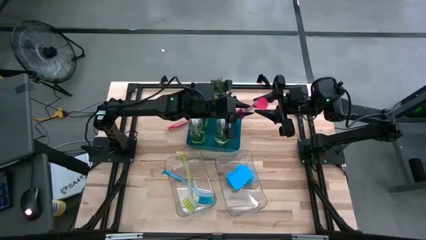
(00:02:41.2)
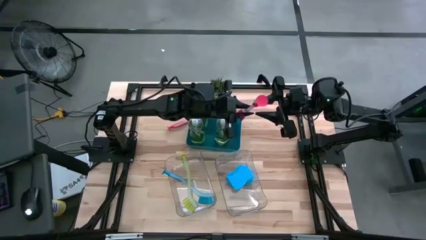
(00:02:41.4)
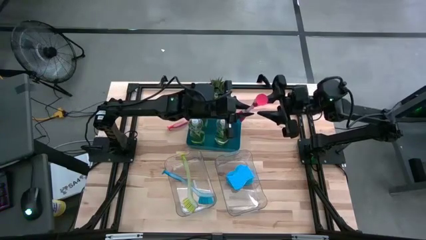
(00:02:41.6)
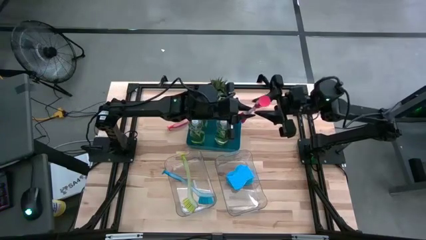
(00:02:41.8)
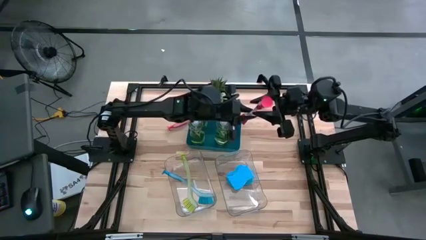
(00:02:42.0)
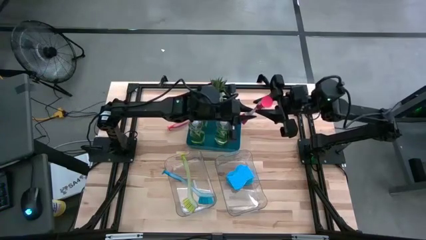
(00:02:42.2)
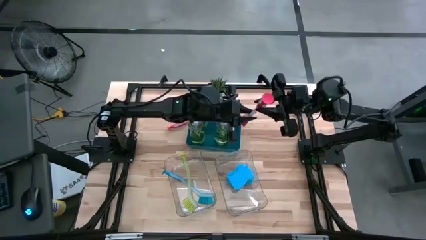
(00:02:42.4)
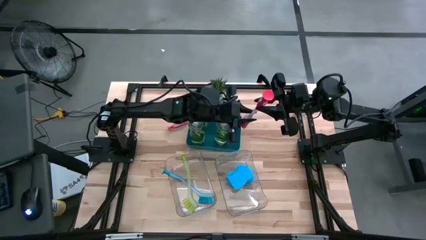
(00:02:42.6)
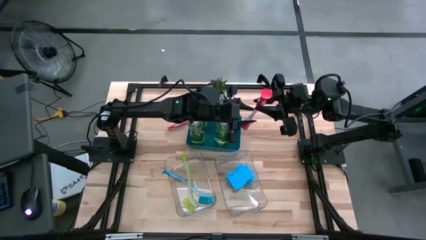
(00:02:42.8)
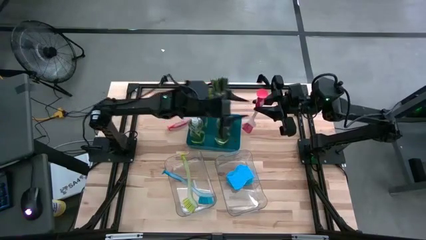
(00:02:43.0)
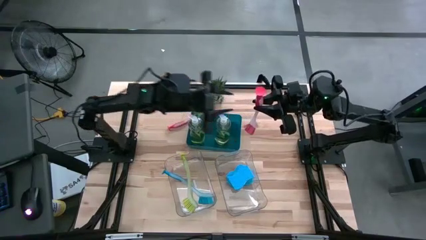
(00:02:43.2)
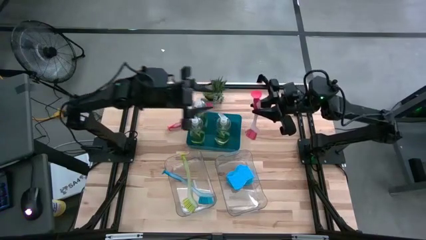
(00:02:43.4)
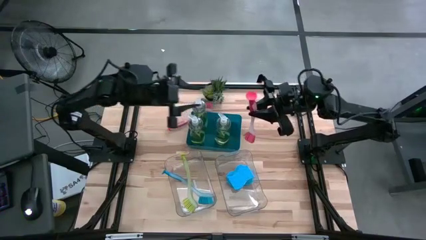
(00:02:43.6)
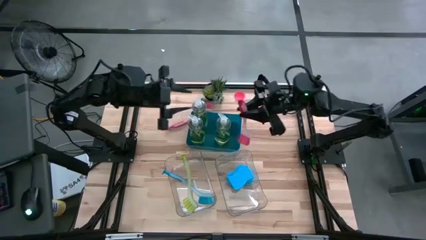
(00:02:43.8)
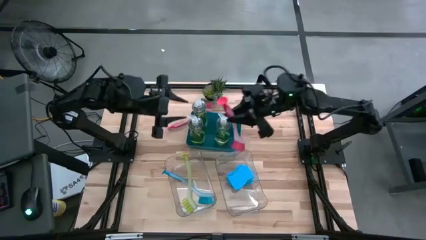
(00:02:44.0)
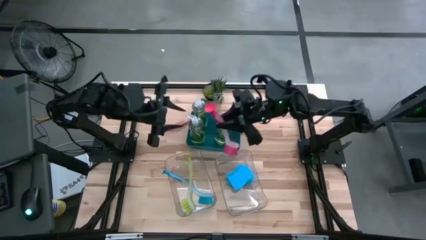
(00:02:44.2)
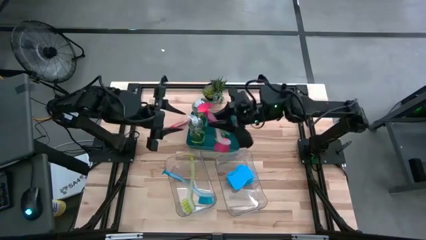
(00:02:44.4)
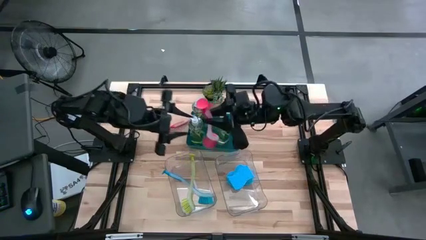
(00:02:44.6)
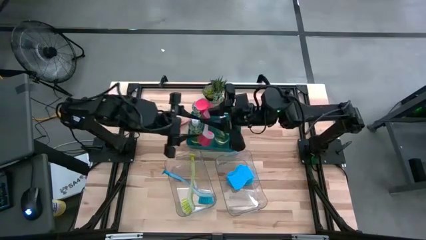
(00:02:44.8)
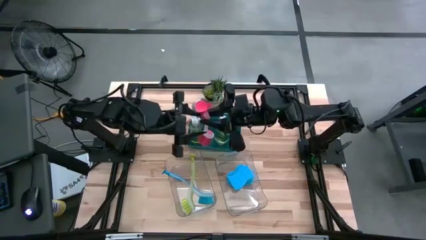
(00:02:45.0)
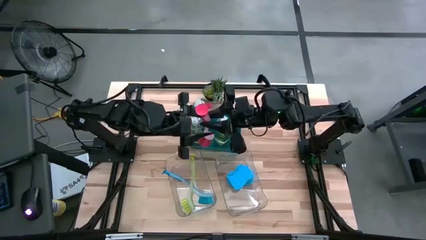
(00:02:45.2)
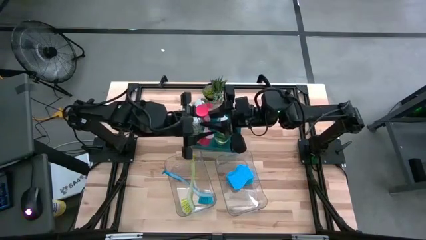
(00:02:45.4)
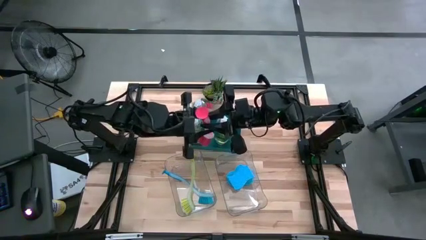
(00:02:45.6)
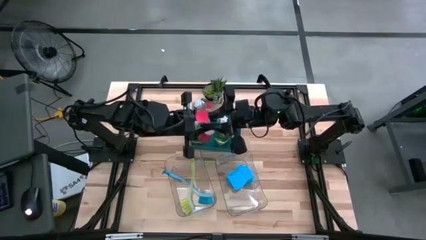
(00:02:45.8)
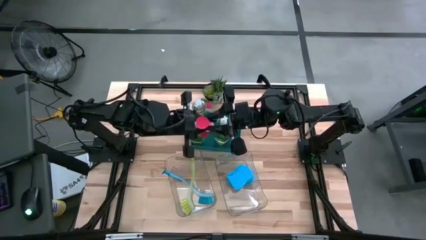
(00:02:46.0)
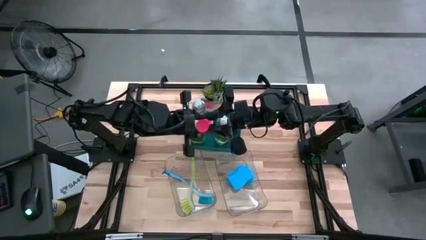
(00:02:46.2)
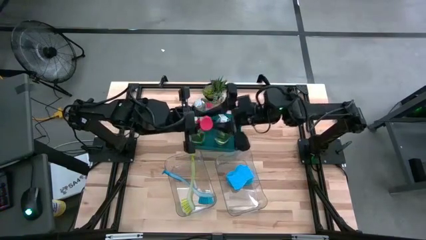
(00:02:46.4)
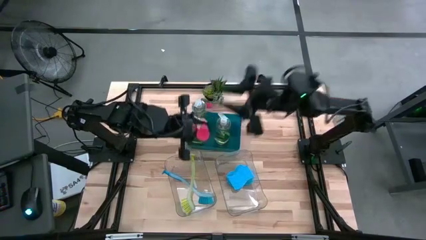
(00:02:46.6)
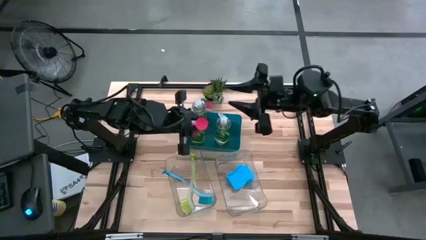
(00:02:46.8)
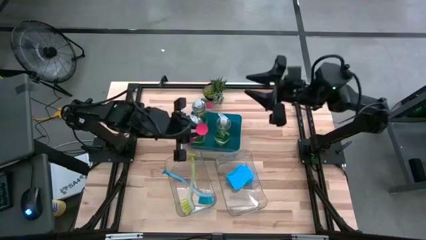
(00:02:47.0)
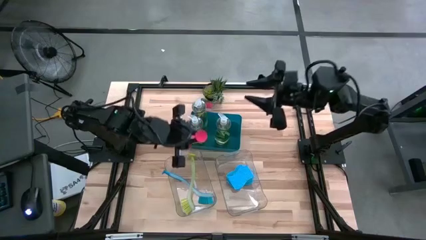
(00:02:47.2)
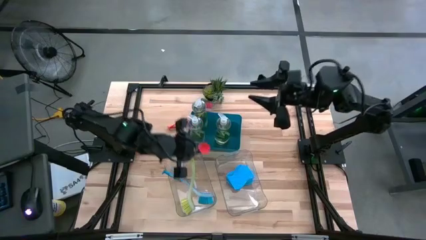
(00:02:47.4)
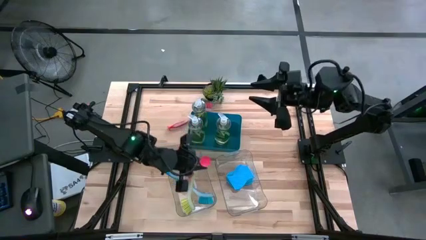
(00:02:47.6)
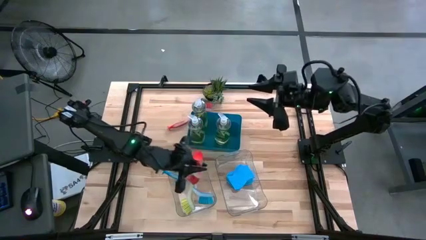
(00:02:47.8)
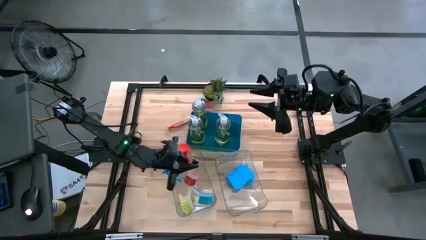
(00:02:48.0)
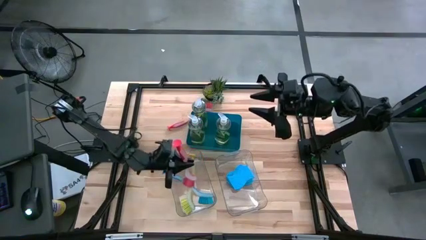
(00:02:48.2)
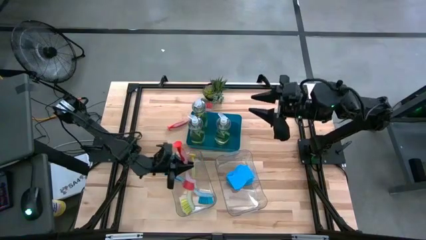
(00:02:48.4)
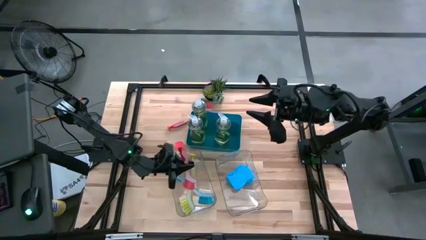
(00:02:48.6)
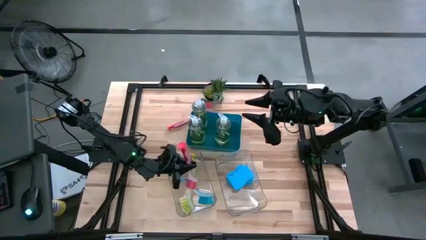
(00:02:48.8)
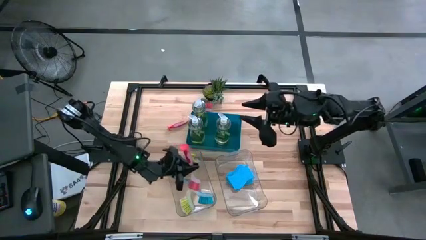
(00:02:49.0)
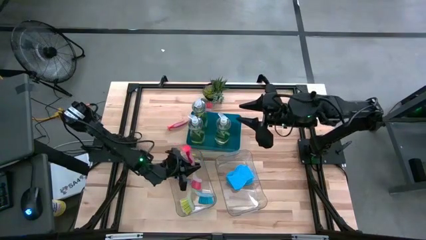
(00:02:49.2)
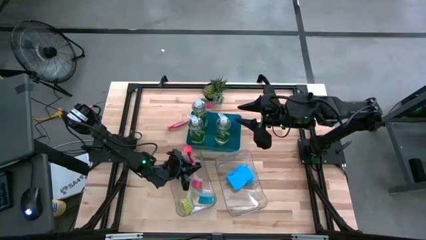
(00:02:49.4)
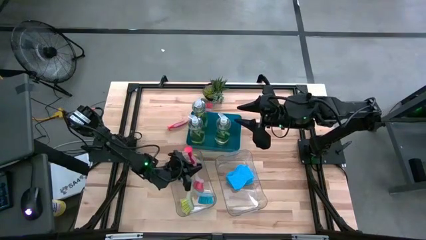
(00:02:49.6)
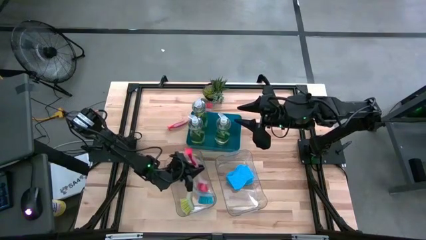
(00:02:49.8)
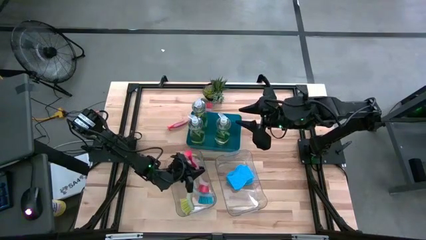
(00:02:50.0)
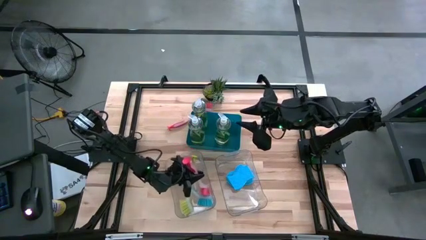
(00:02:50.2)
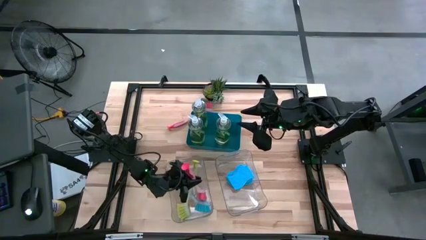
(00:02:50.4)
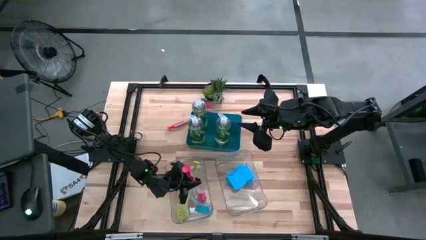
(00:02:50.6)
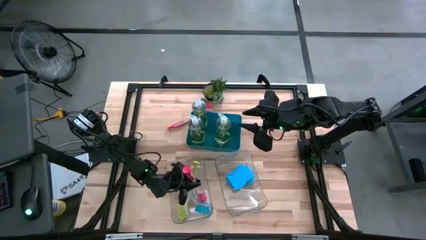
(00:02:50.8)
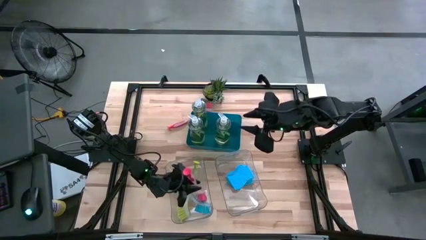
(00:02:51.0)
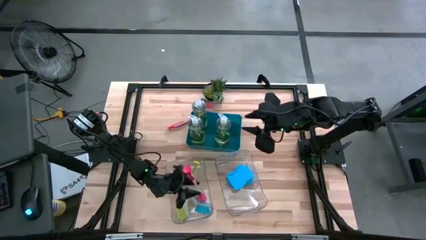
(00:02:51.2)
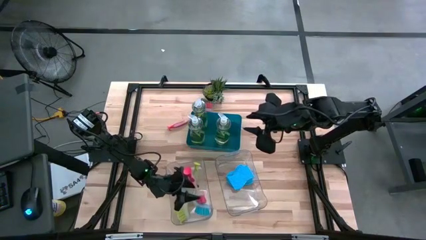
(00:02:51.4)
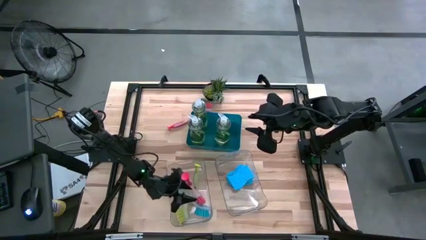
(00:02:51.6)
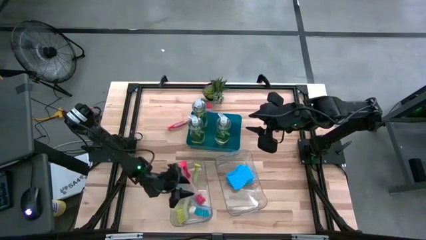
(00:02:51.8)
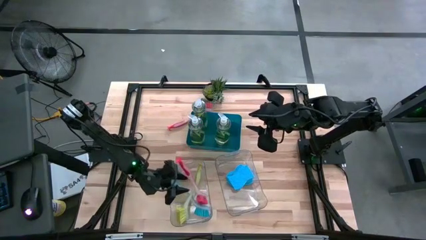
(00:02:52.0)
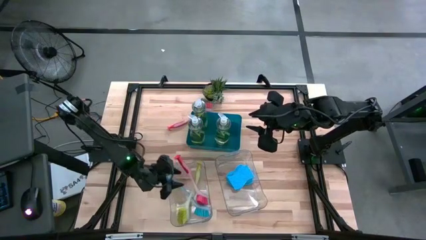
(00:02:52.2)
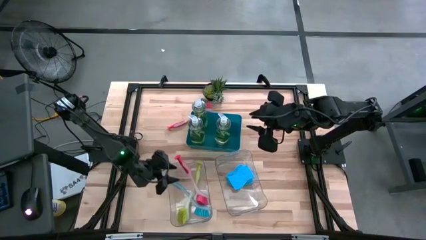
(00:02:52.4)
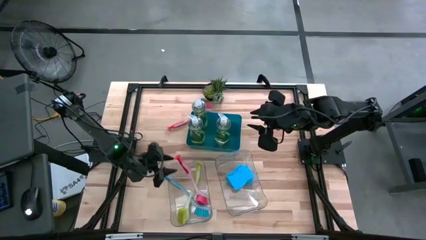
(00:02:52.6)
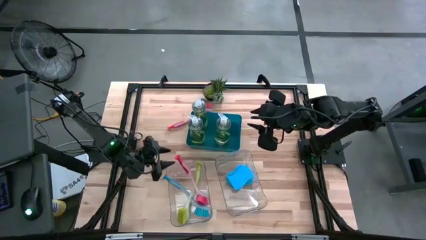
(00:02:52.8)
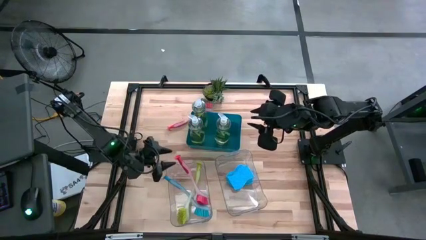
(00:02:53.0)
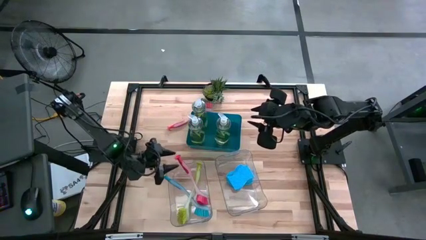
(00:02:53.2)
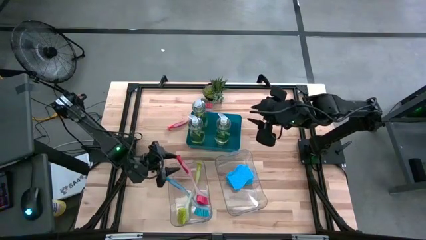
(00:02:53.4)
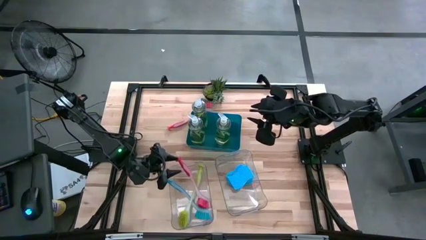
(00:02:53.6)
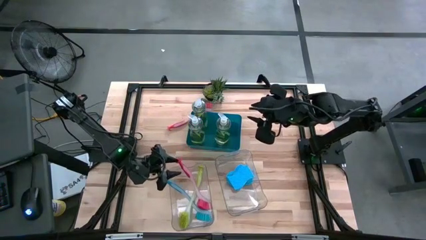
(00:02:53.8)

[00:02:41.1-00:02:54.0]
Task: Pick & Place Kitchen Sink Supplies
Put the red dish brush into the left transparent bin
